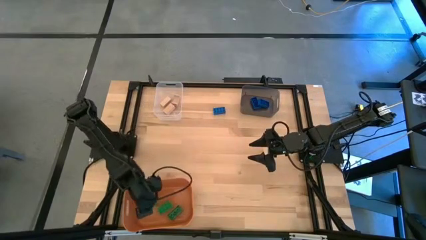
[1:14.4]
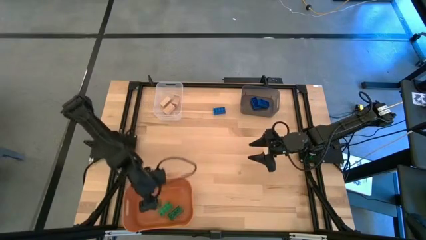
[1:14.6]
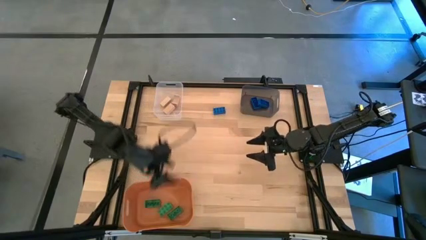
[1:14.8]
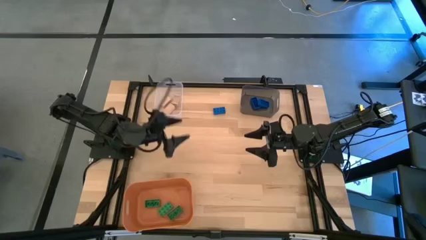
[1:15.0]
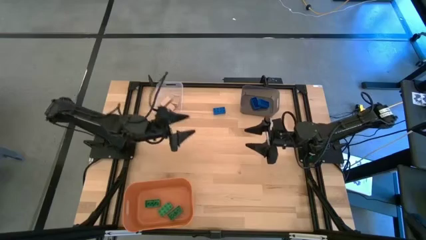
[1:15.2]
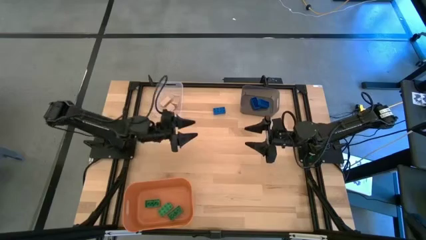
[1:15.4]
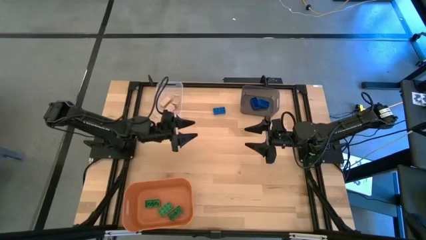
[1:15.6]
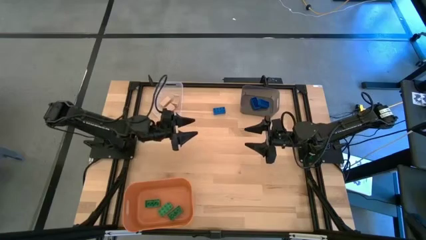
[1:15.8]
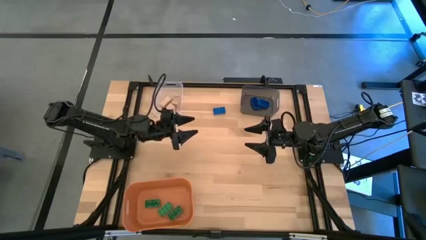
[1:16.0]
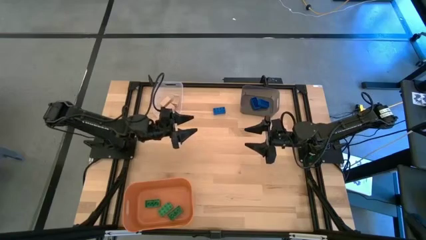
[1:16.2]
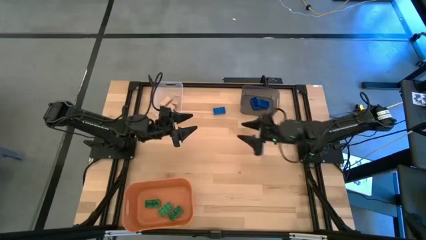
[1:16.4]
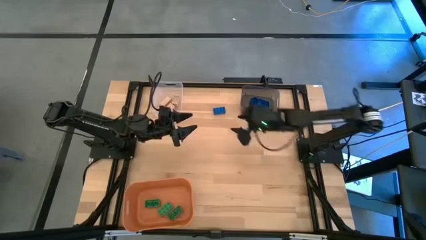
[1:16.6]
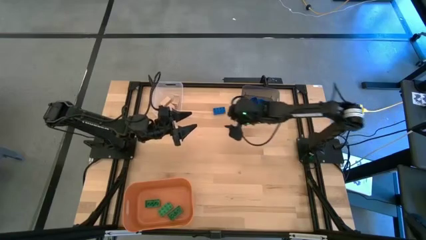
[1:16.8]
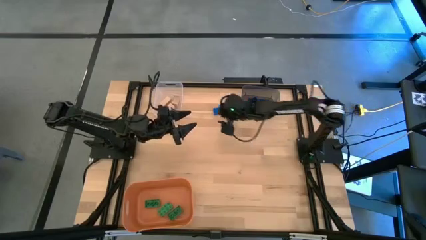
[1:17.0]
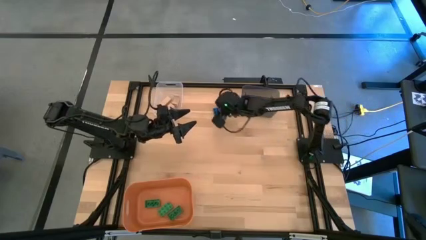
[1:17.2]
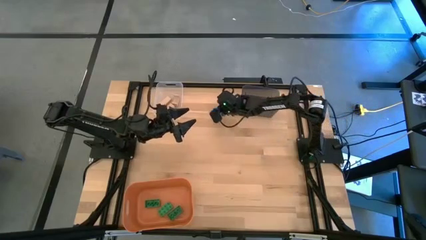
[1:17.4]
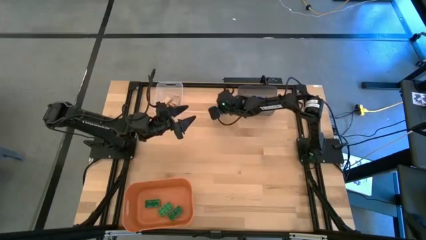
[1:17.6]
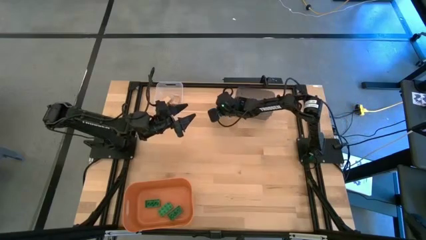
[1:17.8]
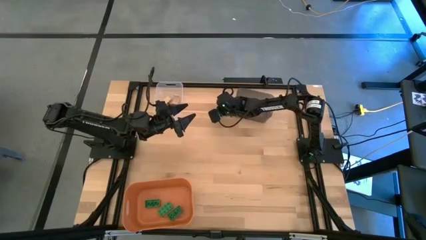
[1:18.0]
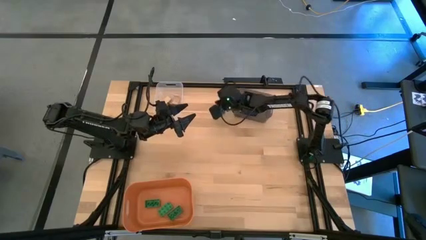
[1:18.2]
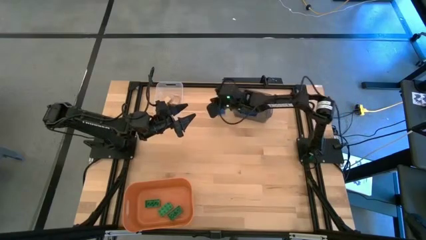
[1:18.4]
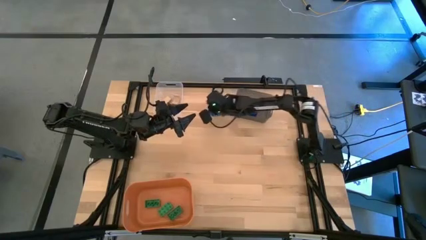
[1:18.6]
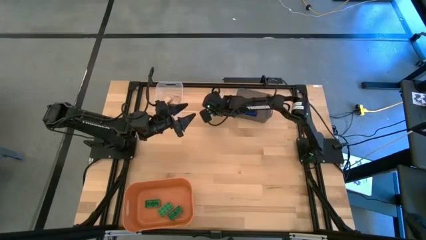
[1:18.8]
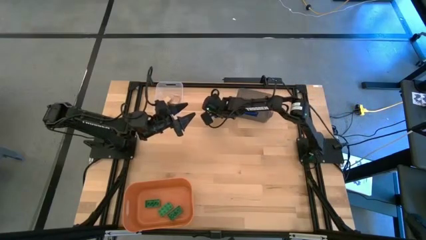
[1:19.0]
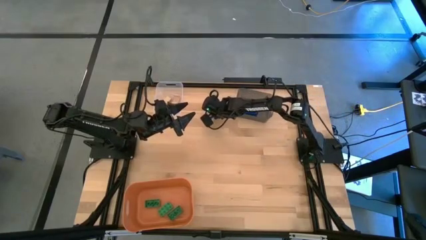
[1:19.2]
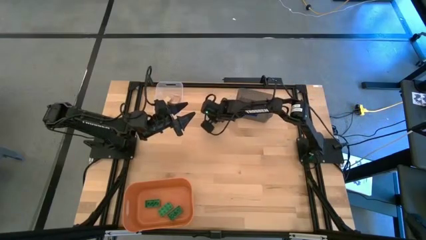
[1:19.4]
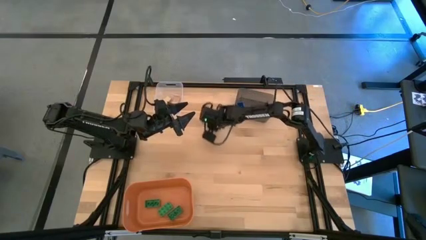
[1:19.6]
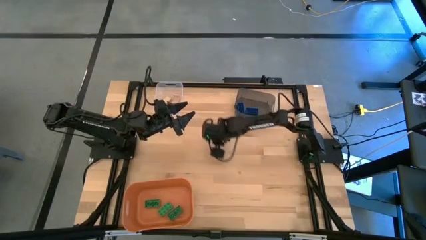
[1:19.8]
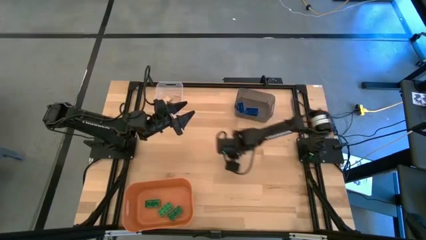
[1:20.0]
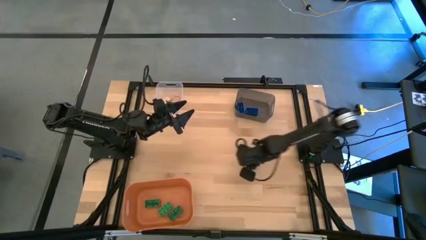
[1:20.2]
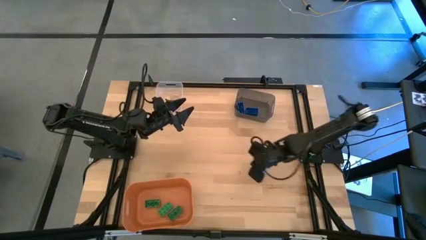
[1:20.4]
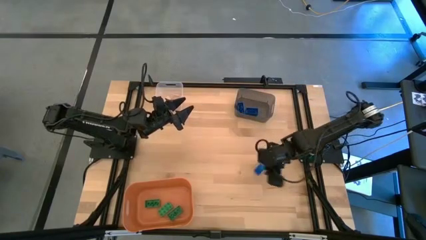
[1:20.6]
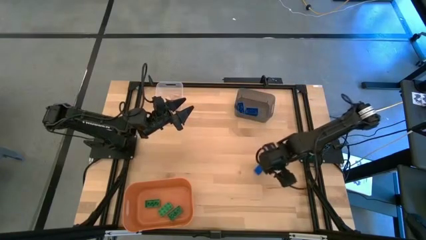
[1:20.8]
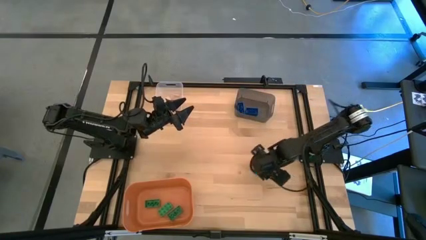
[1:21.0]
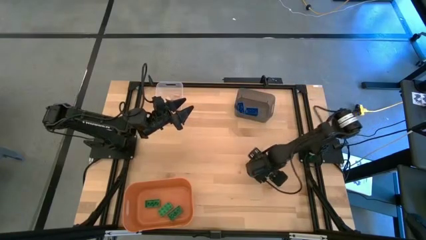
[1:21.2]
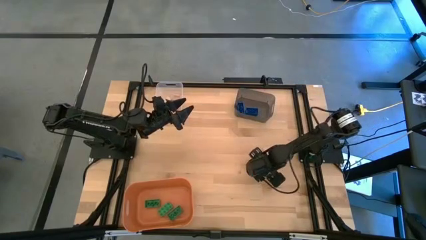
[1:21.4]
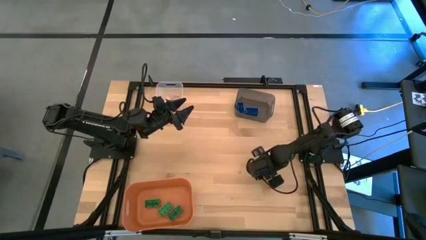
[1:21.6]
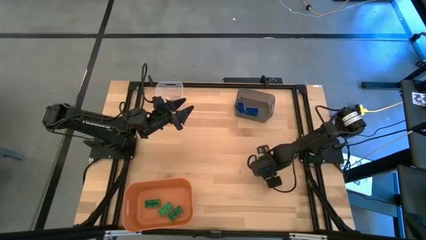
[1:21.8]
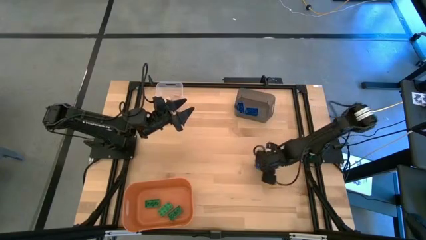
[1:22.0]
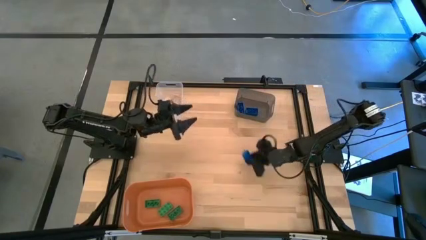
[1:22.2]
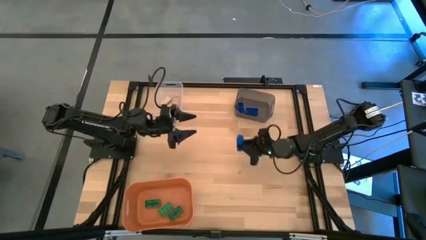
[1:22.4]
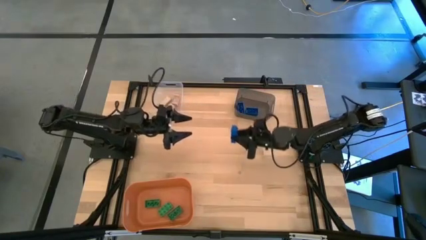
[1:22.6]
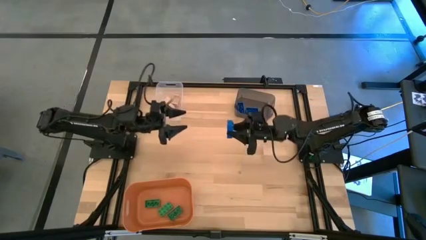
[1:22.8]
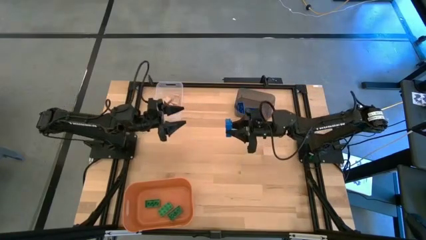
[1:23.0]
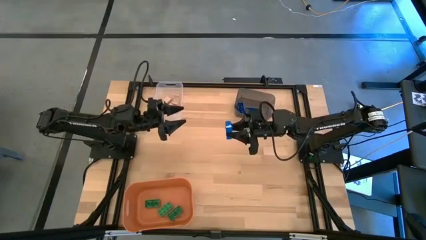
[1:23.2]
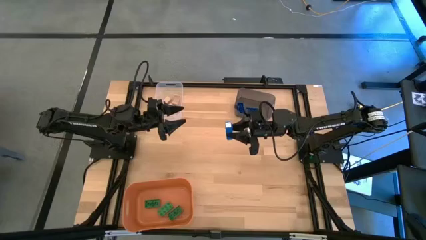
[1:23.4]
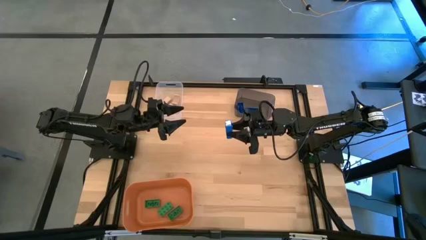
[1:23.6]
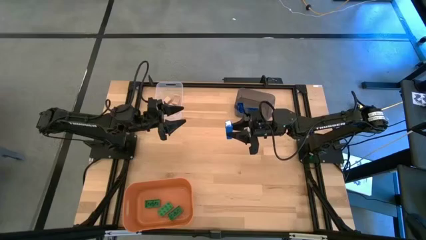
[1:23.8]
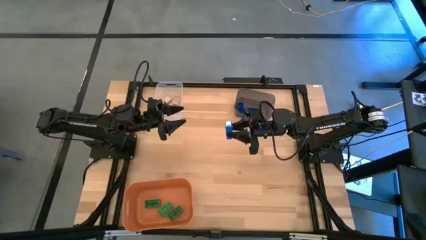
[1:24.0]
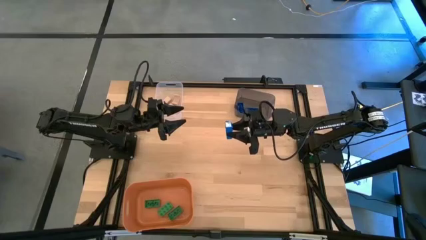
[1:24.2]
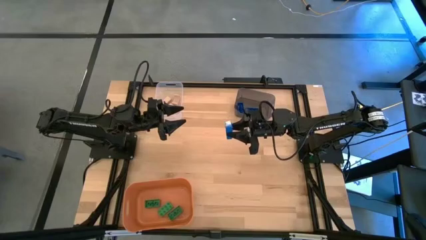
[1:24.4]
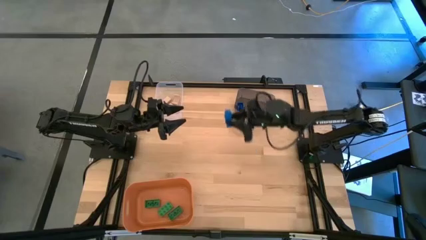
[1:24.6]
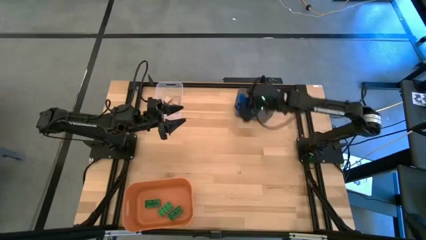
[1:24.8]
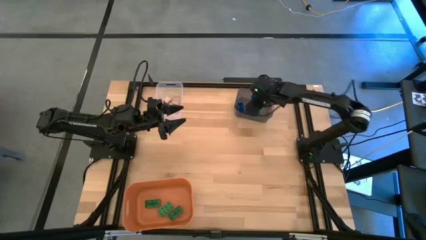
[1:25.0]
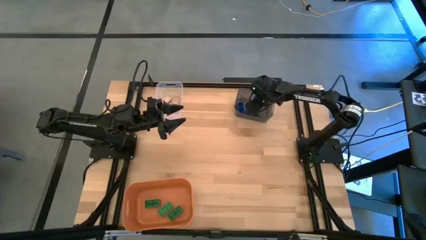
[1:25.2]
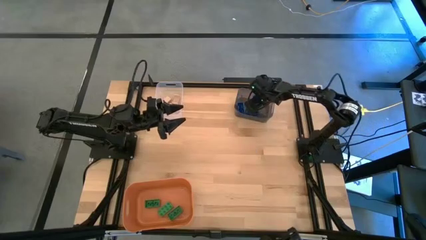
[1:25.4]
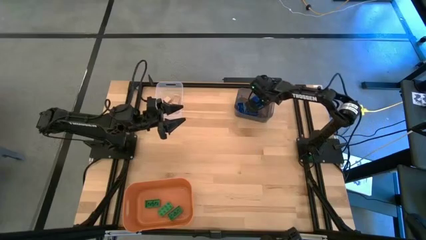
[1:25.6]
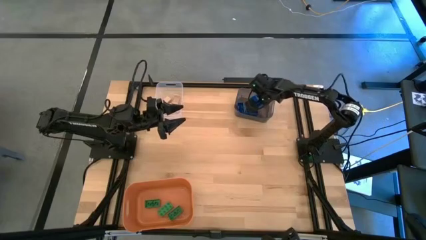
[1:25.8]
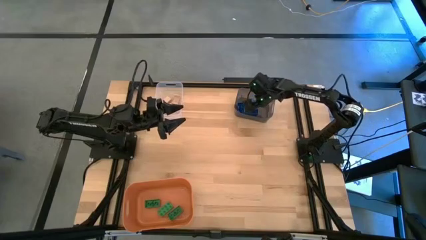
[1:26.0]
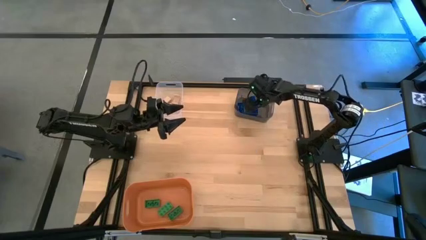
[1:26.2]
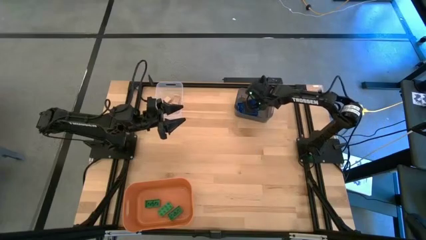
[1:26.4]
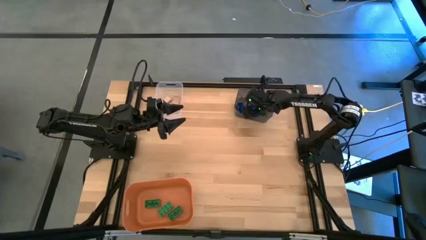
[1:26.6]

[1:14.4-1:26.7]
Task: Sort & place blocks by color
Put the blue game piece into the black transparent bin
